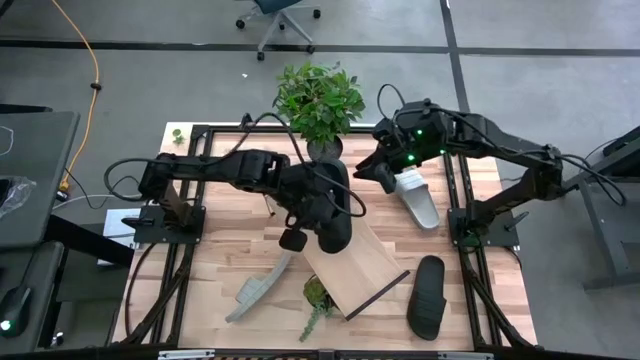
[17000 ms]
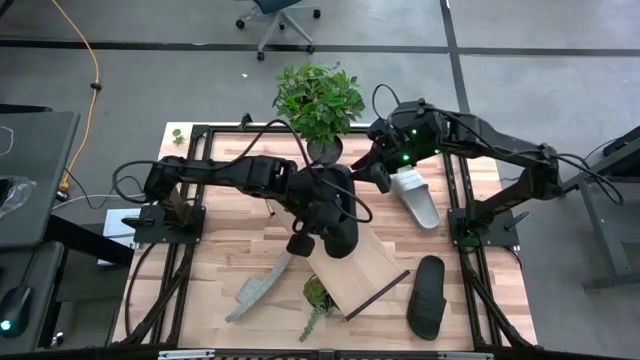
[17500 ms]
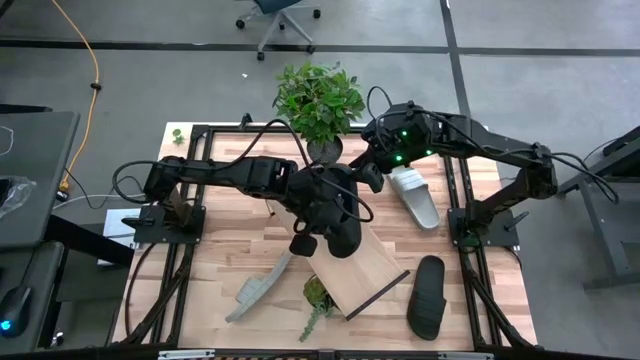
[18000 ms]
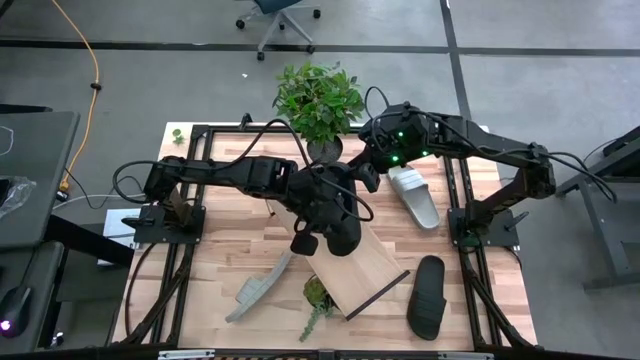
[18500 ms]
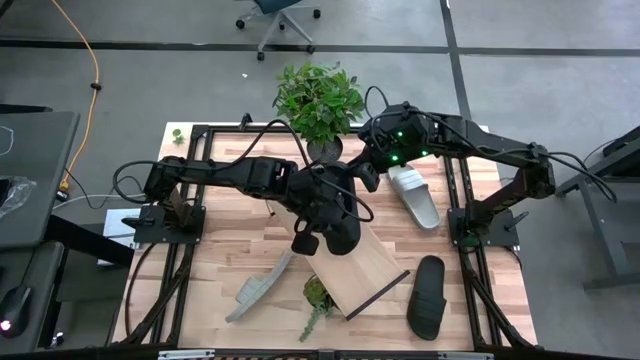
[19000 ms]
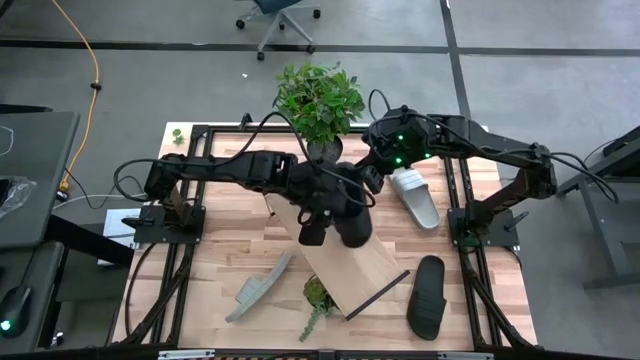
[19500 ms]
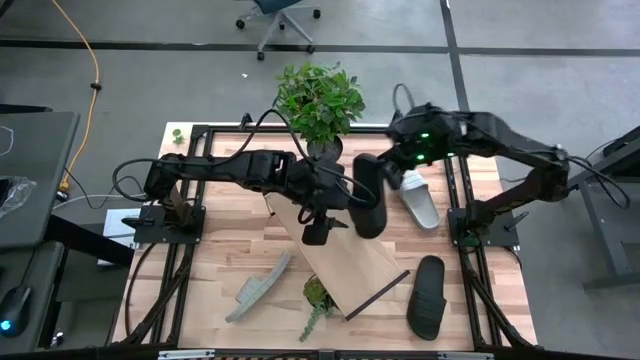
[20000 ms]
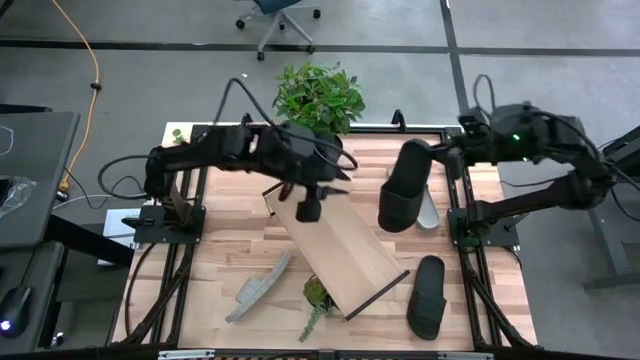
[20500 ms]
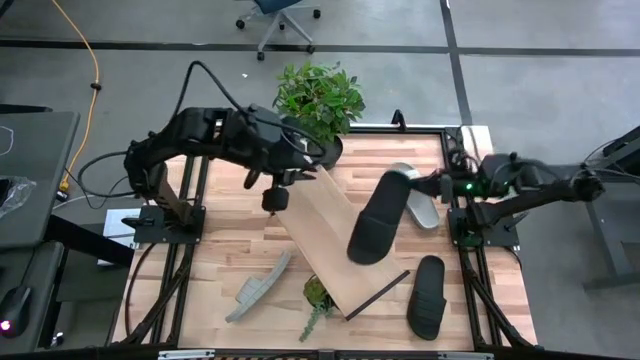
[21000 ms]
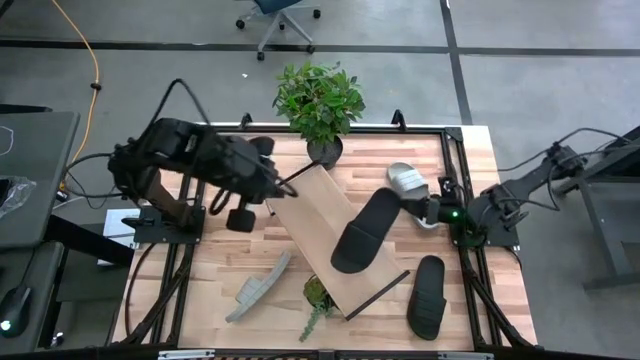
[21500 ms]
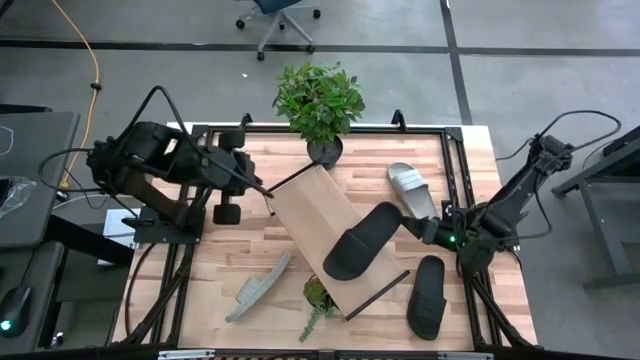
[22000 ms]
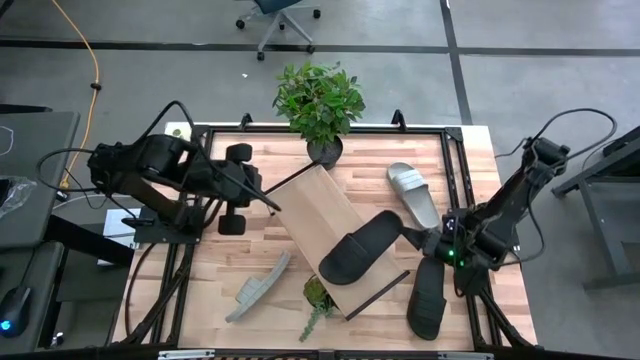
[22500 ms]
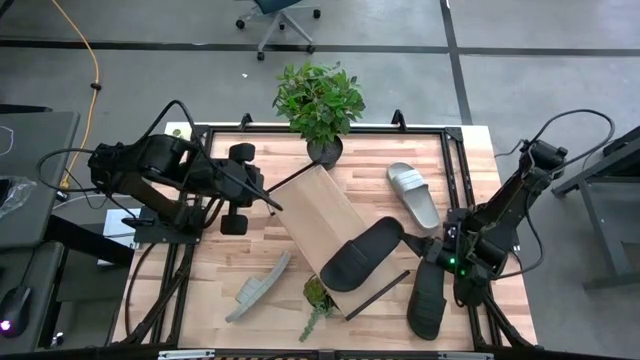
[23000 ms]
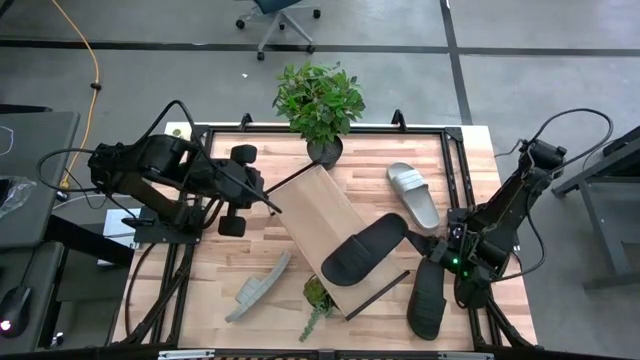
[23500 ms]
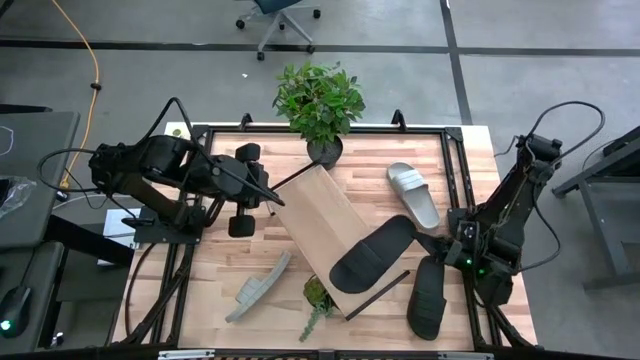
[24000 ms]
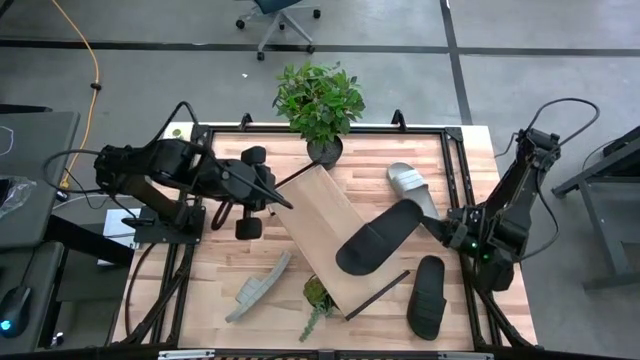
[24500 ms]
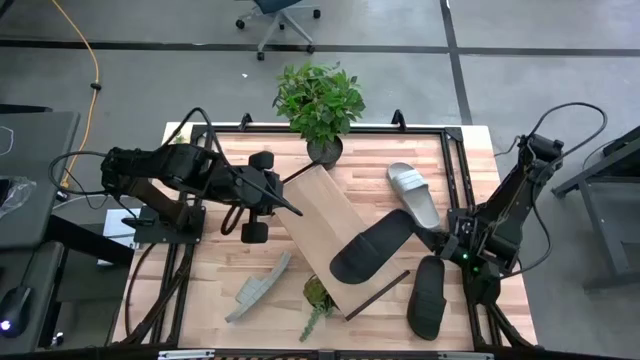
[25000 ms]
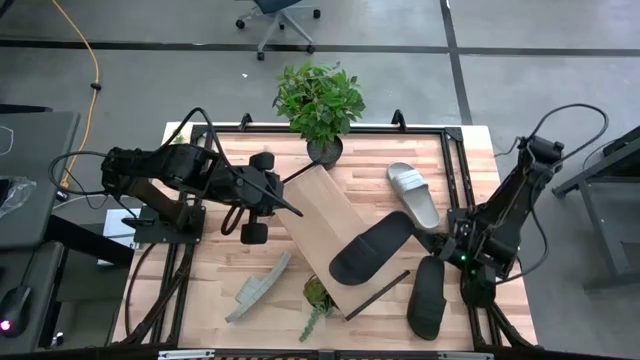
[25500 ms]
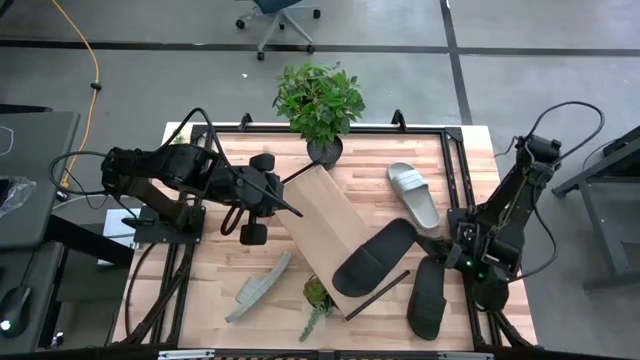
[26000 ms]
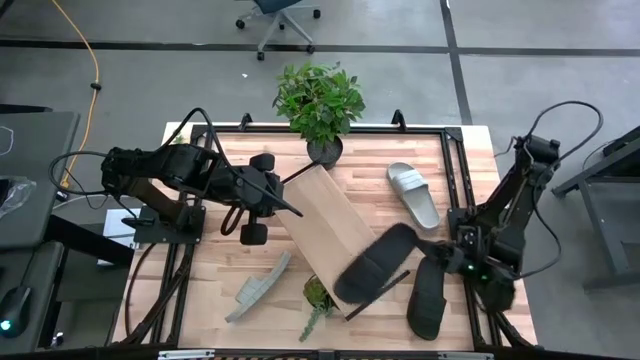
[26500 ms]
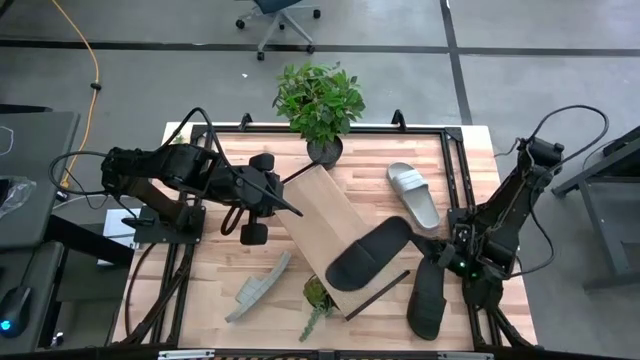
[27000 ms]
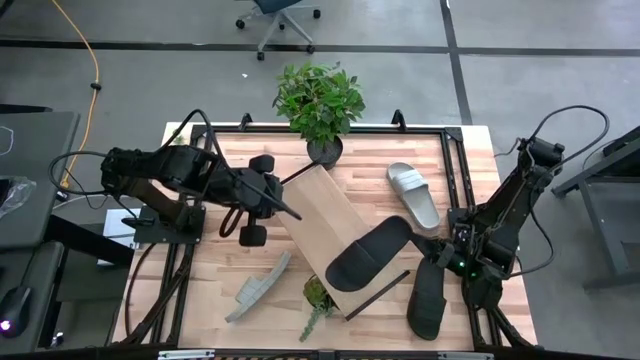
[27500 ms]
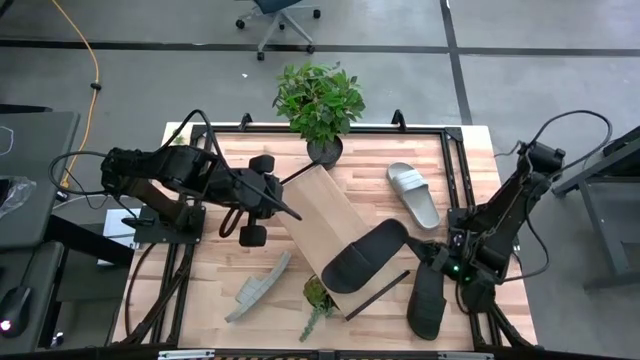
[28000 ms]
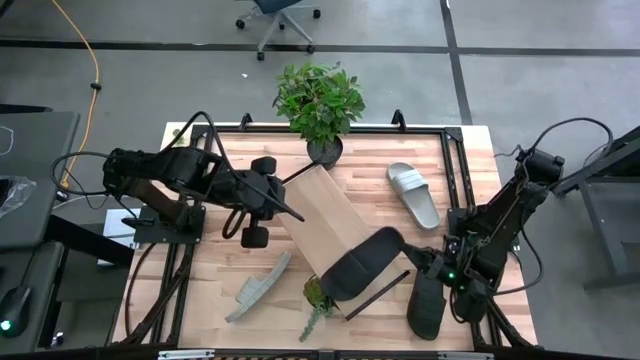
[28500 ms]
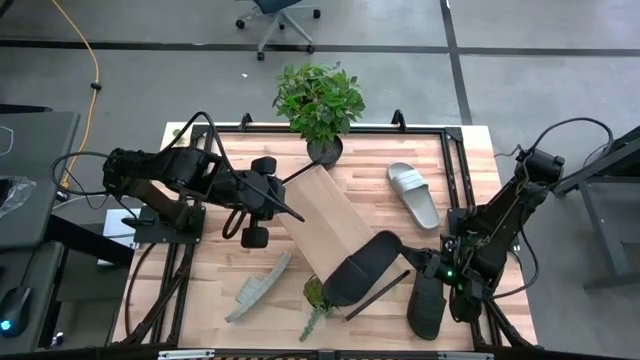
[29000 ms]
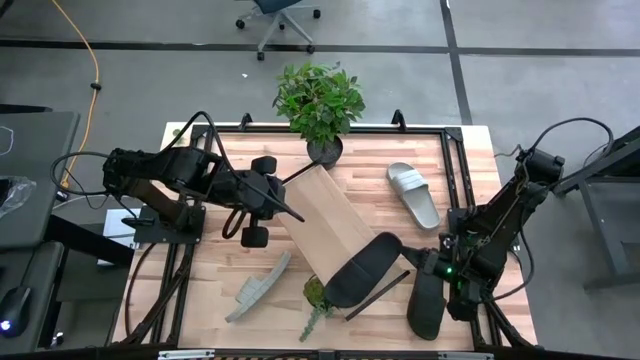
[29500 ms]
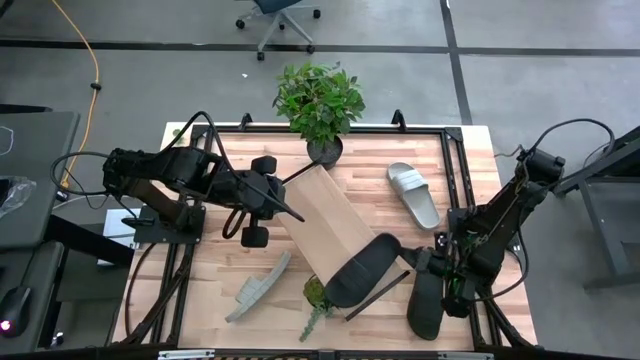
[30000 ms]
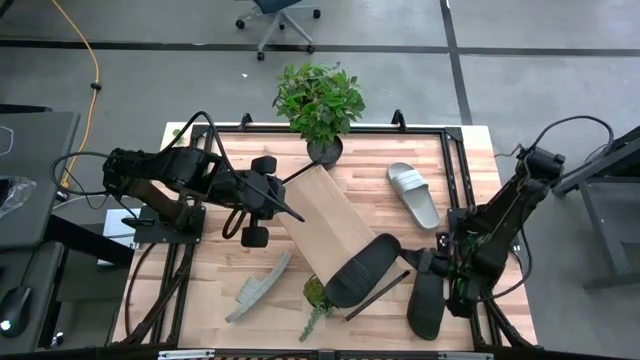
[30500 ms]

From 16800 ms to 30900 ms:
Task: Pick and place slides into the shelf
Put the left black slide on the shelf

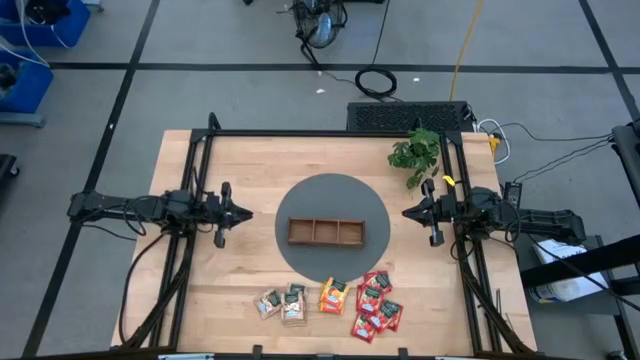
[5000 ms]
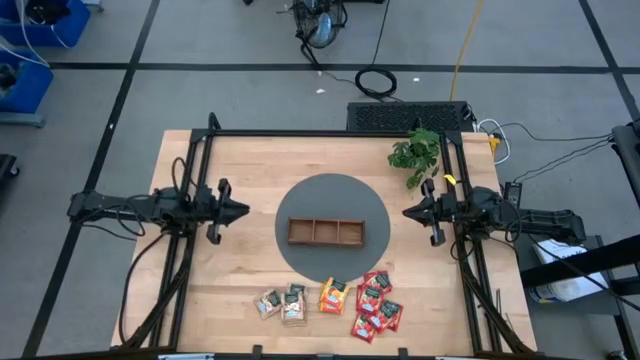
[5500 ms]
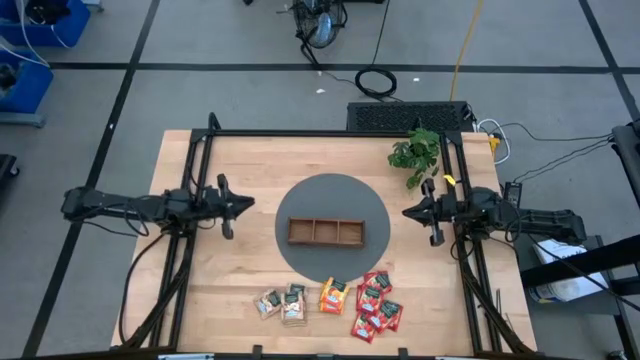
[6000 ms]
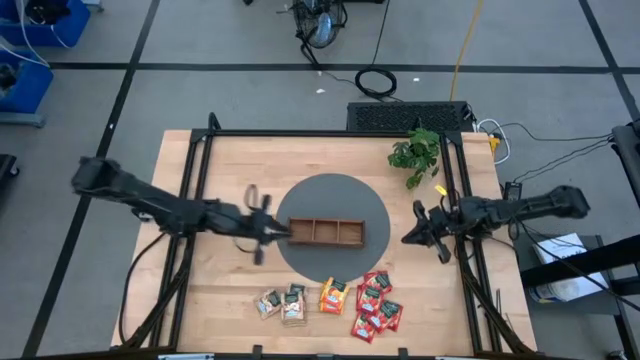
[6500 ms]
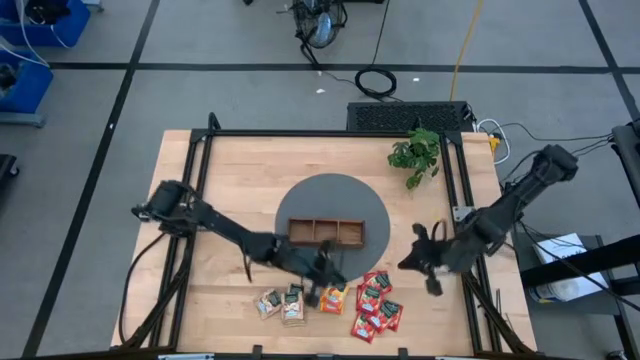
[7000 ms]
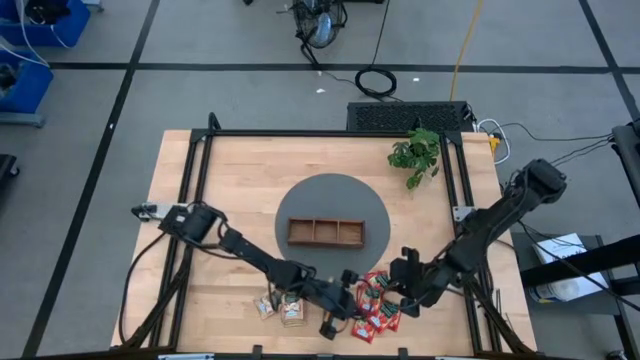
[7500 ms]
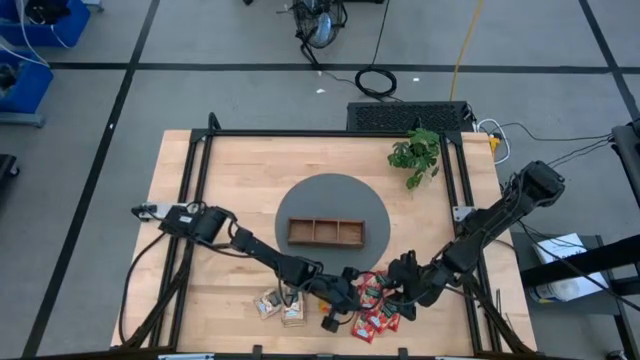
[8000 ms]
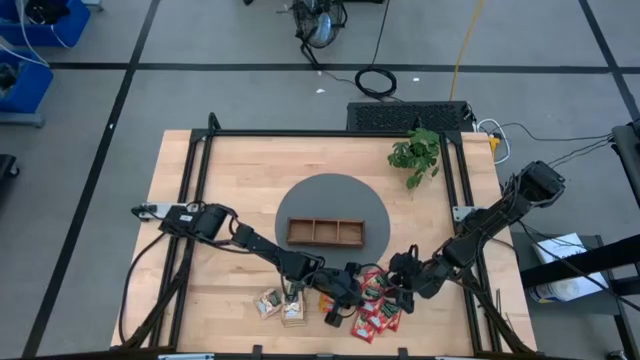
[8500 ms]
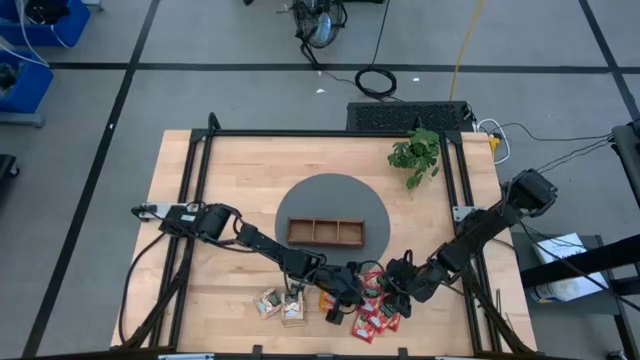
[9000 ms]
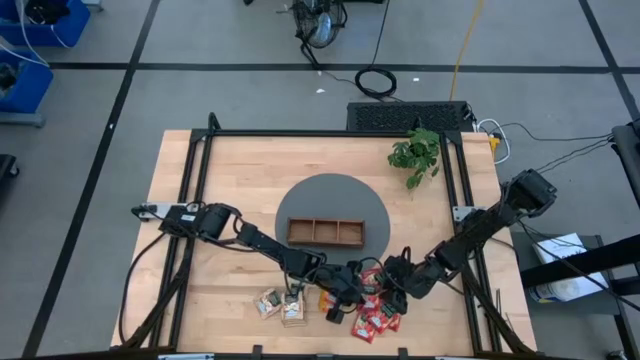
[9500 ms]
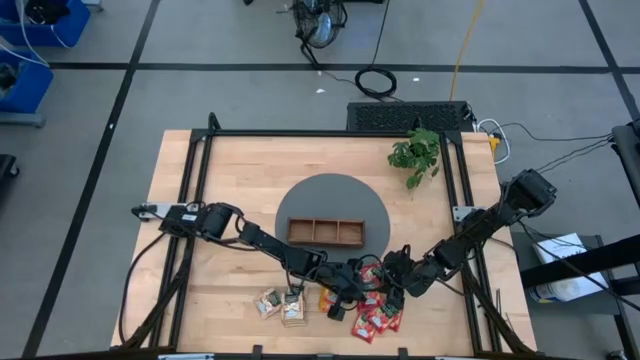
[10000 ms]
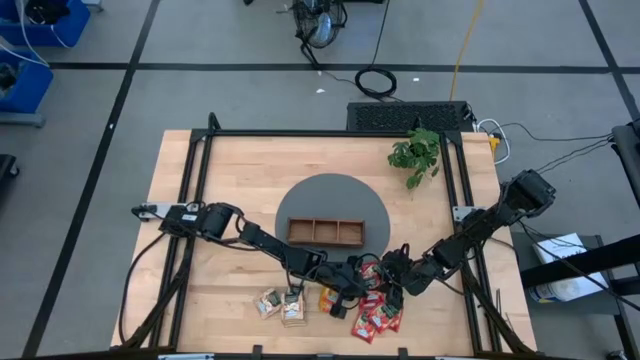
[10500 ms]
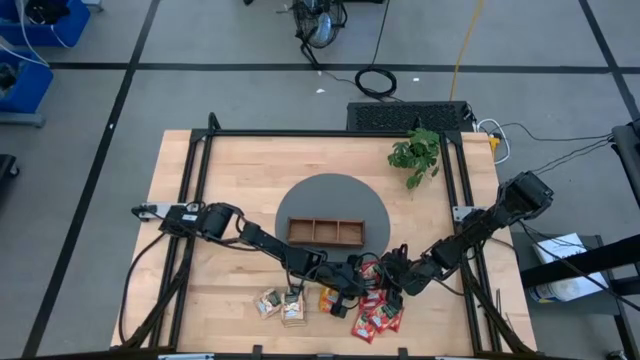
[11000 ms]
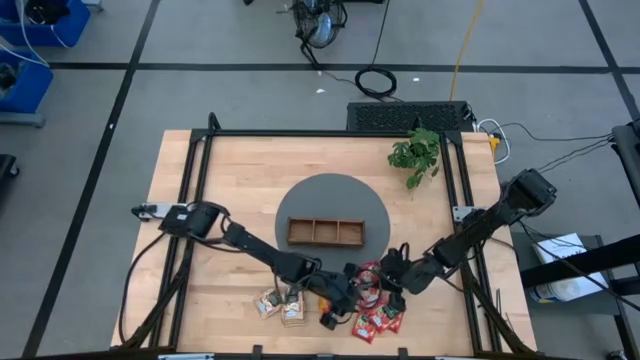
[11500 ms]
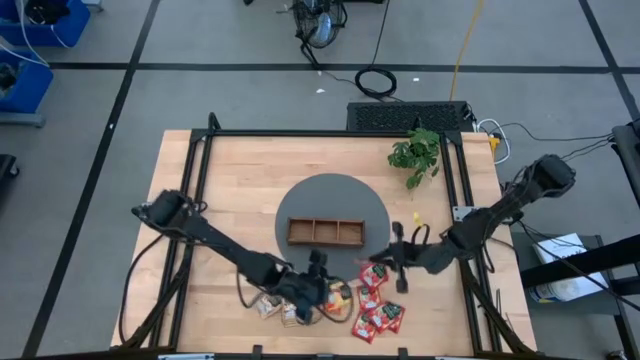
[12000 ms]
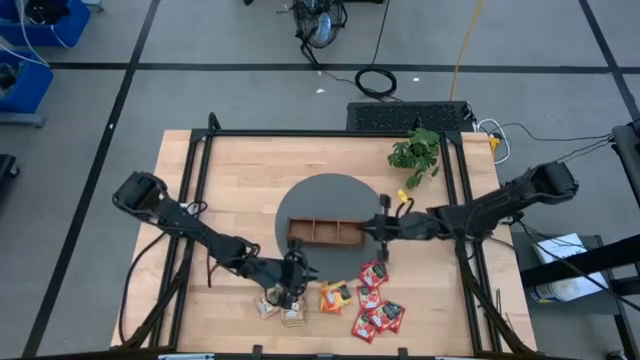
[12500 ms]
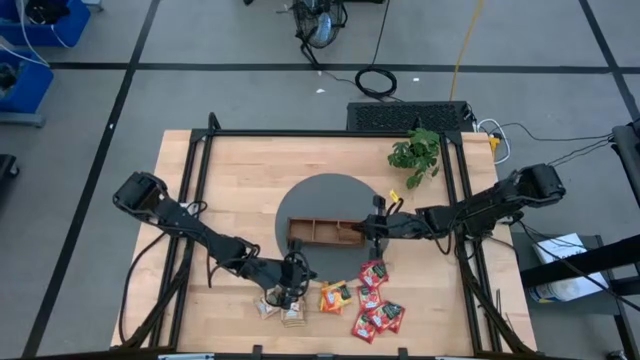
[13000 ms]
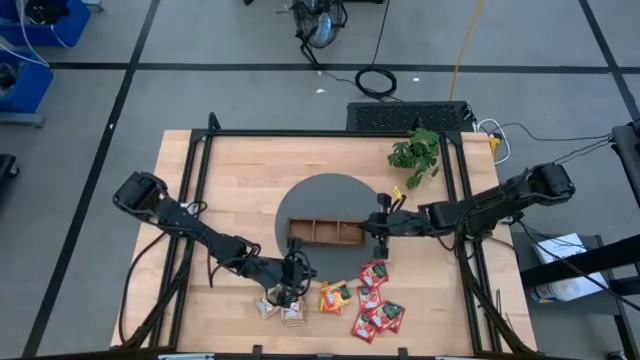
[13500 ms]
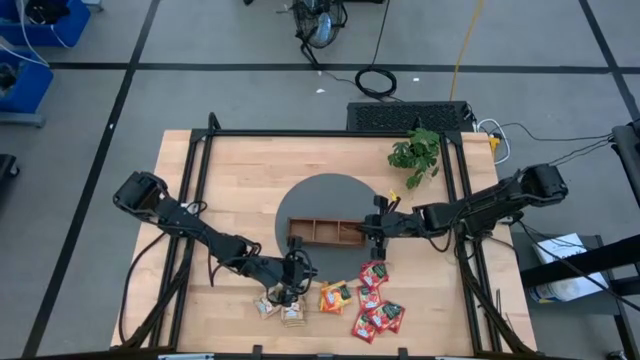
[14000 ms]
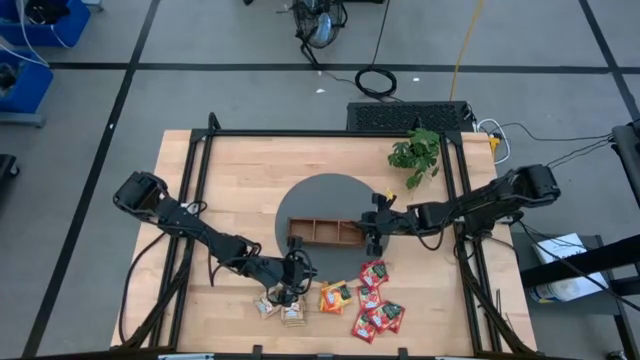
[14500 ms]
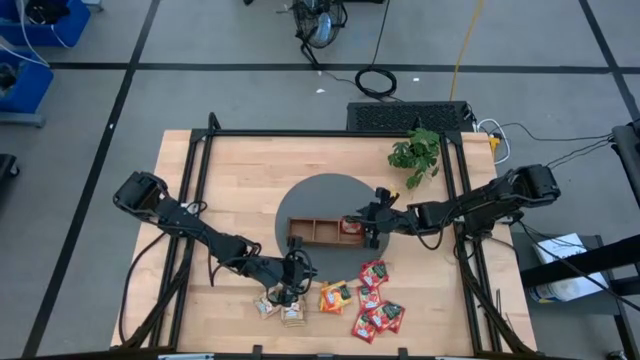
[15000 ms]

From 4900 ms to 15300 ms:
Task: Pick & Place Tea
Put the red tea bag into the right section of the wooden organizer
